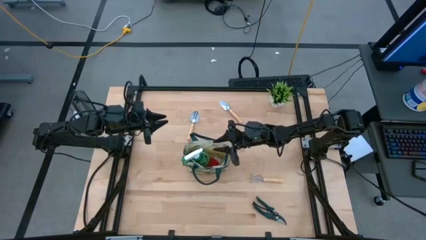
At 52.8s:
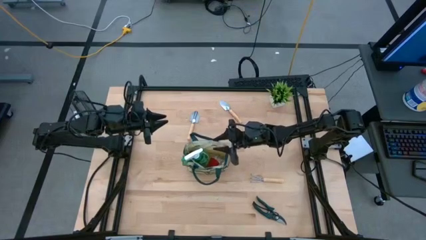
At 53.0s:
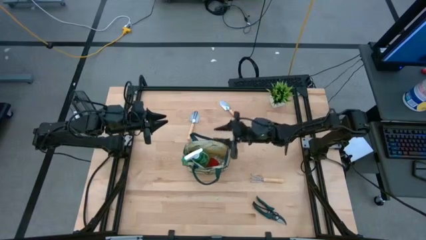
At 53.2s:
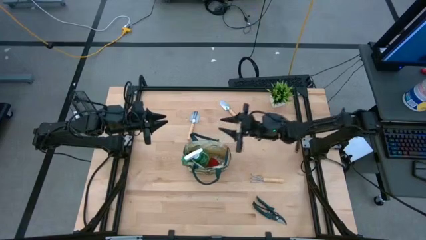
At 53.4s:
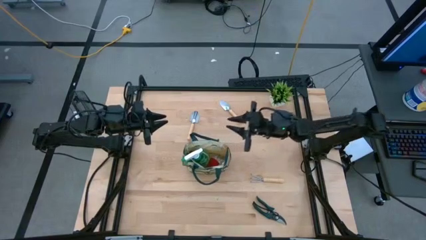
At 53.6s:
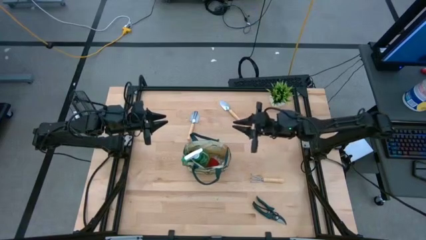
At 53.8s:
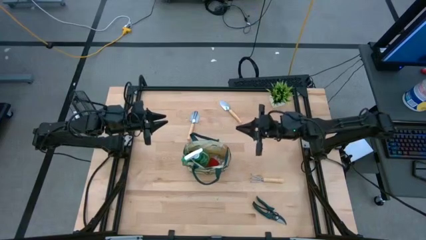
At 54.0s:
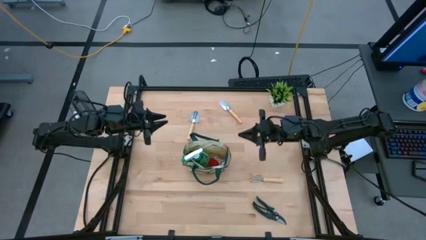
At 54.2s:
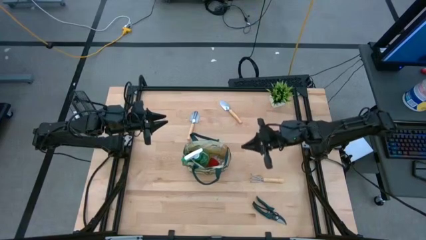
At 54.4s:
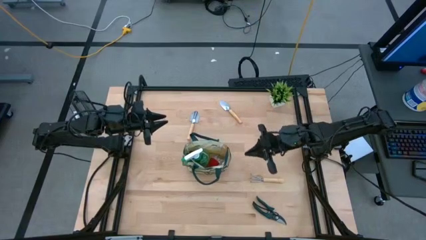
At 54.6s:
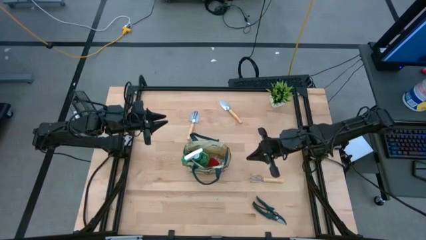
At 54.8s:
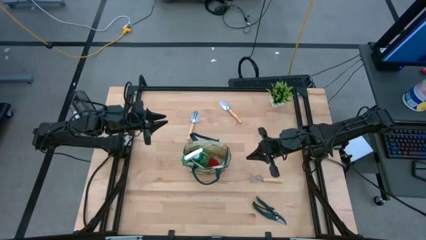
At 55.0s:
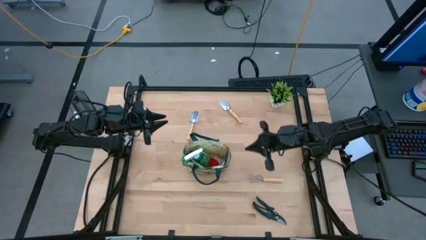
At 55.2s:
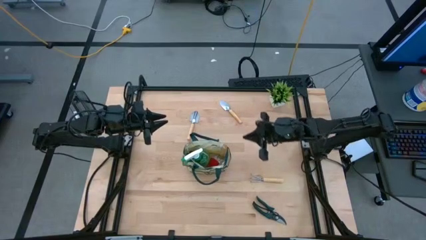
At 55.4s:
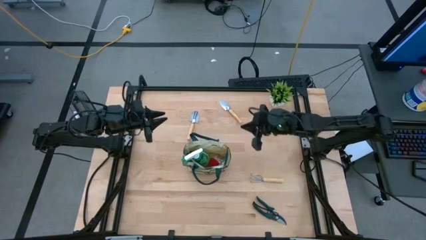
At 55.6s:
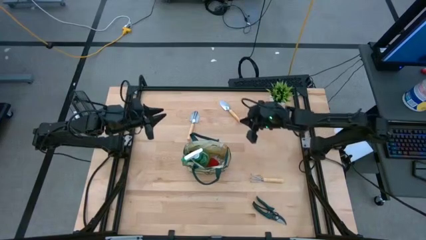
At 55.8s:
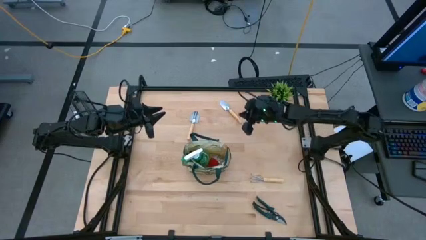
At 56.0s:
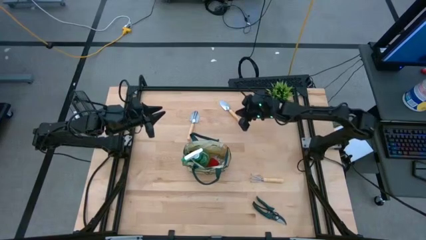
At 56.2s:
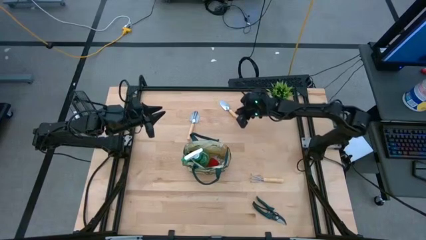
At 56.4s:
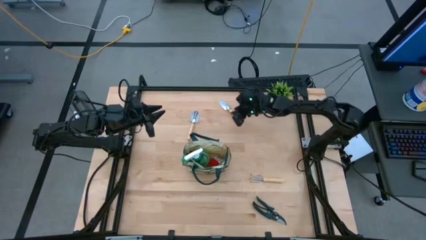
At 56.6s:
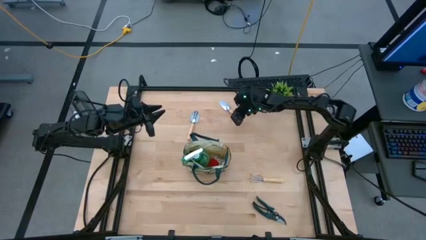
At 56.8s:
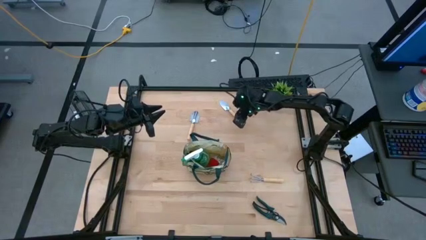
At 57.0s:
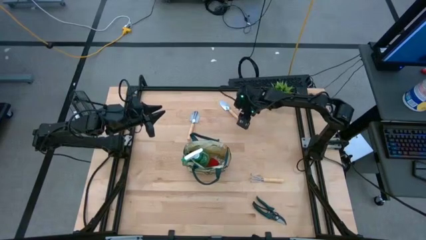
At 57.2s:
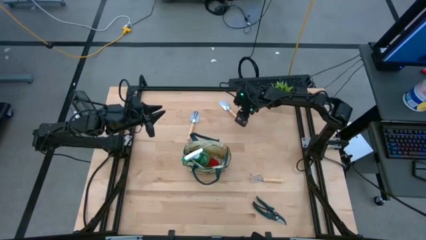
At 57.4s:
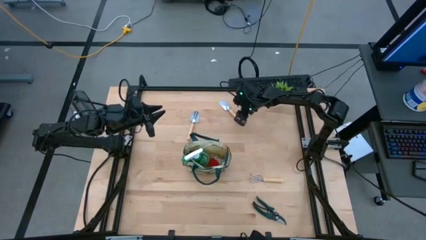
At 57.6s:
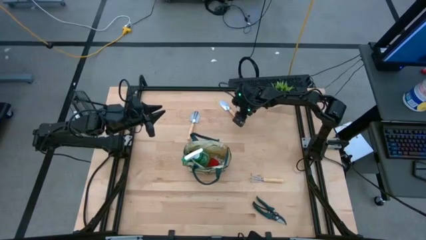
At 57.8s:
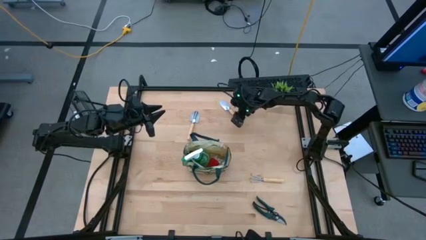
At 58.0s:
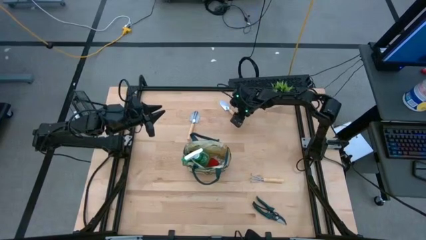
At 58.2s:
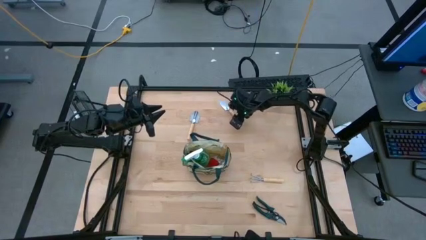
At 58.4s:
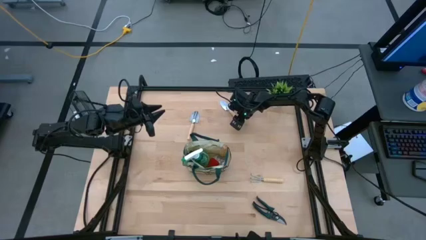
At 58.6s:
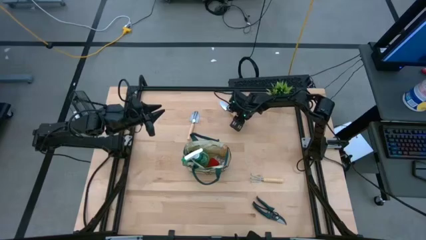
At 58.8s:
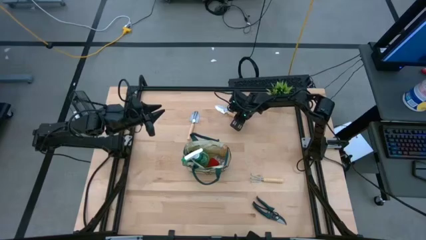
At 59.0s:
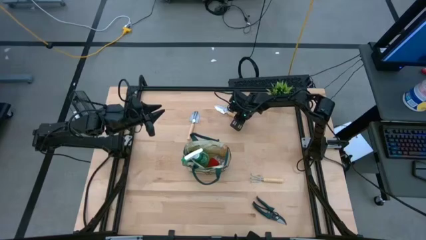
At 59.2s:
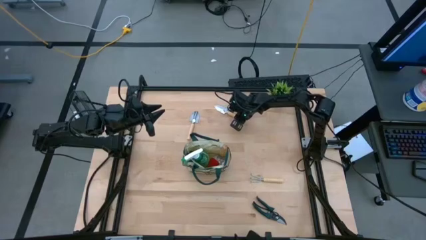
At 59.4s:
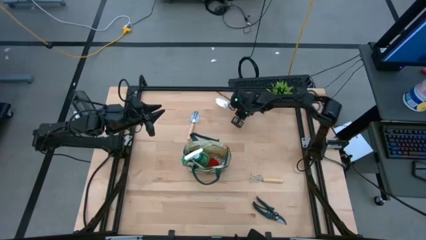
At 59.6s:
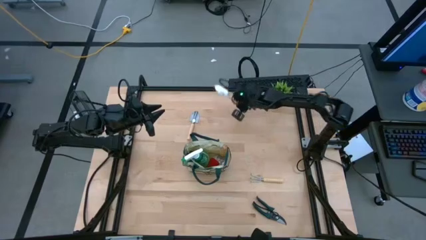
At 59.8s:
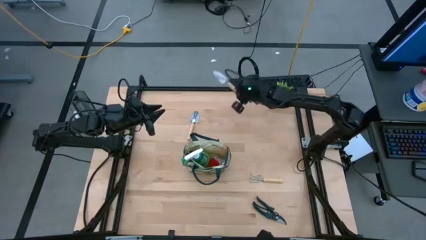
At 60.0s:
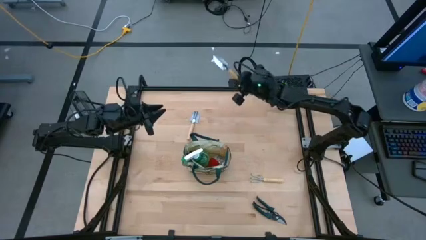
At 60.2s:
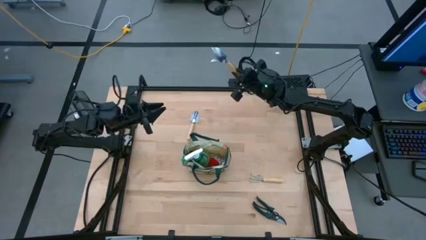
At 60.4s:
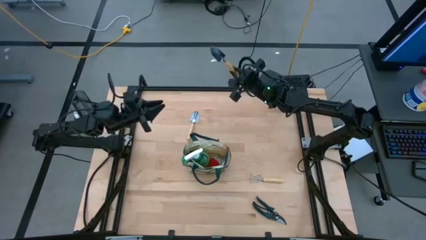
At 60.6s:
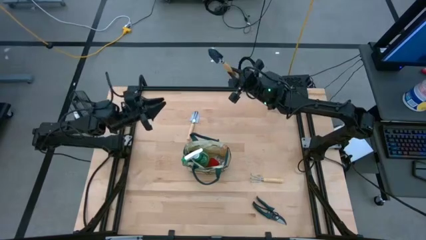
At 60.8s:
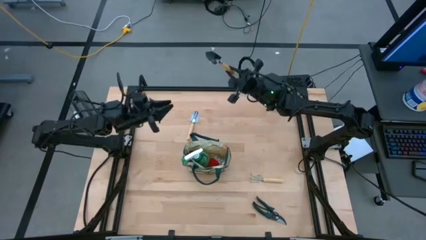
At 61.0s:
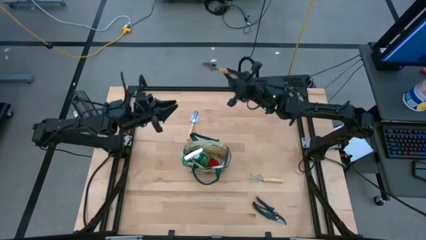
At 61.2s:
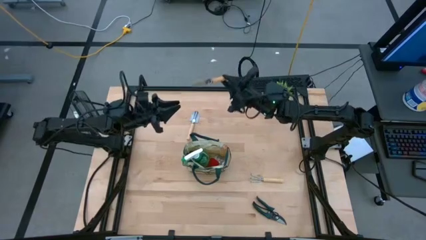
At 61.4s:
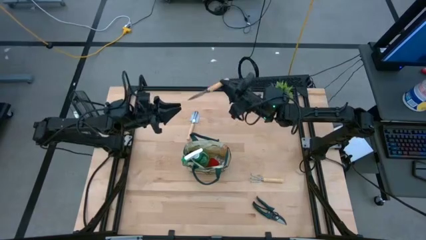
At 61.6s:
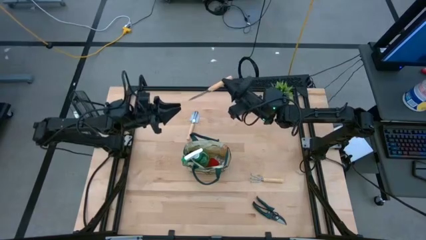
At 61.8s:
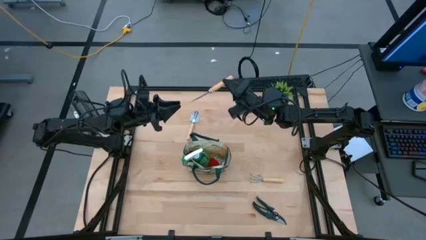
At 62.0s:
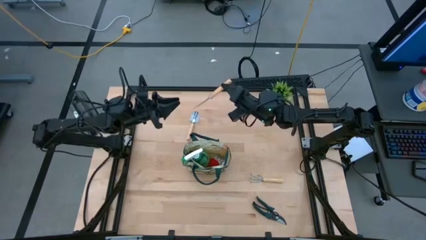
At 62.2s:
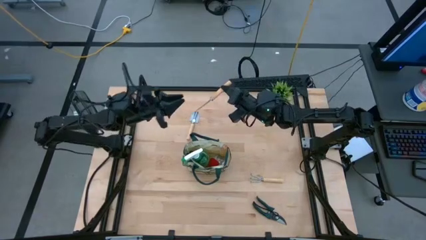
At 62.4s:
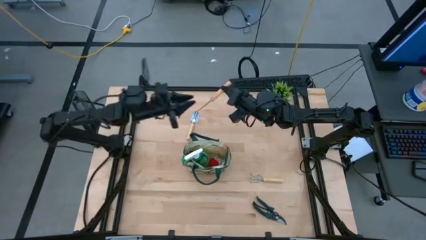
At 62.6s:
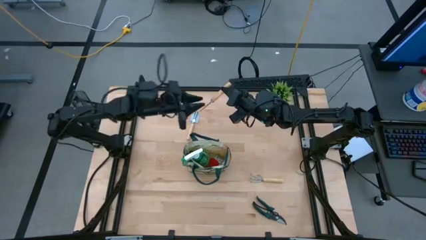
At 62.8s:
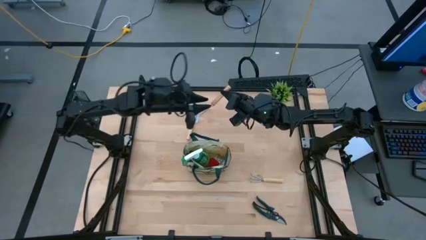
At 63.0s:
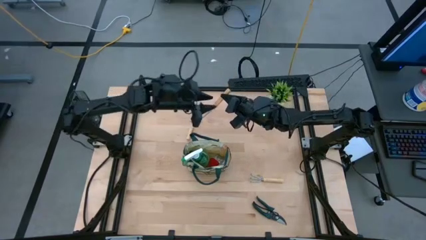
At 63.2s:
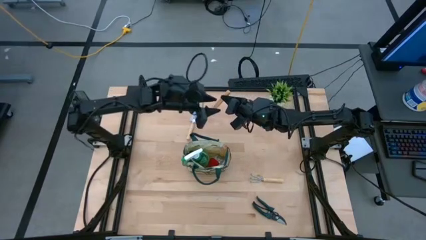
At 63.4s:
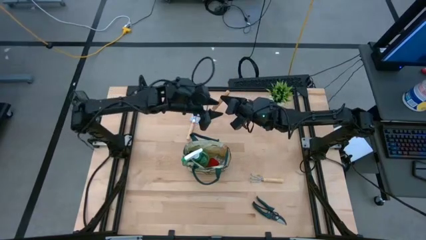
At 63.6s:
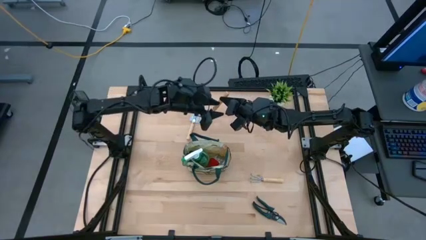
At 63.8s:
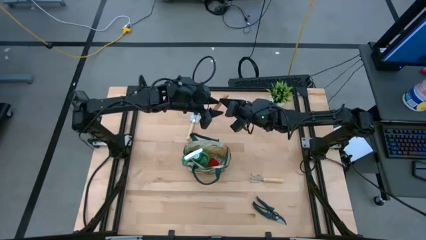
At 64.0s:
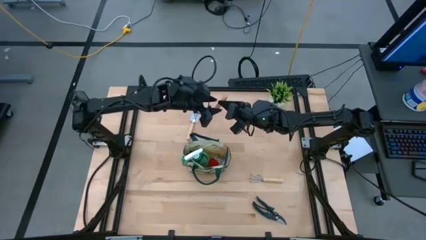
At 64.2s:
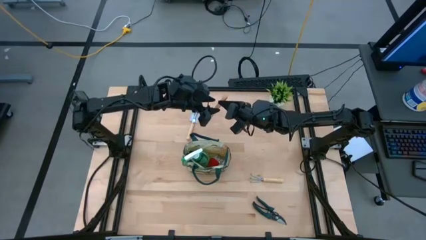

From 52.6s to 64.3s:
Task: Pick & Place Garden tools in Gardening bag
Put the right brown trowel into the white gardening bag

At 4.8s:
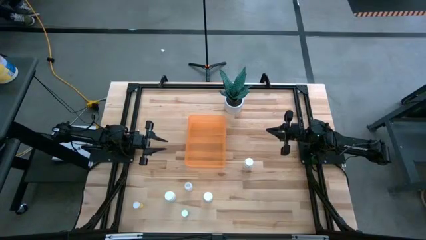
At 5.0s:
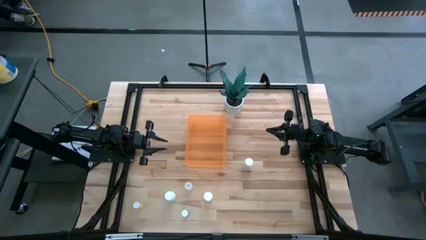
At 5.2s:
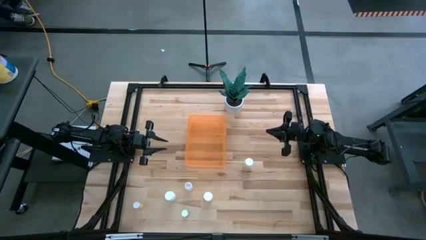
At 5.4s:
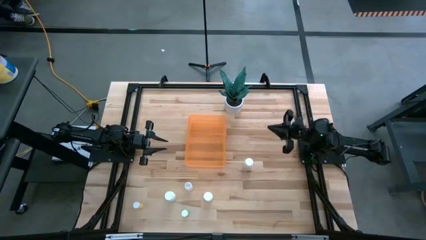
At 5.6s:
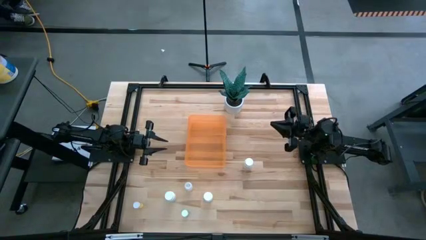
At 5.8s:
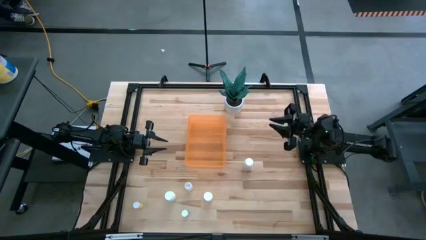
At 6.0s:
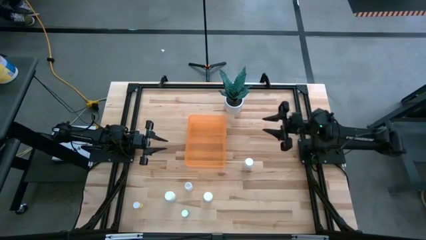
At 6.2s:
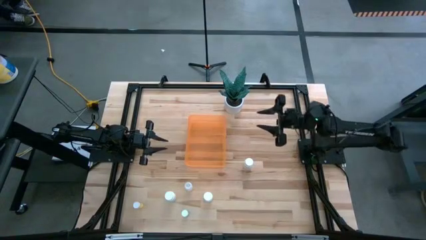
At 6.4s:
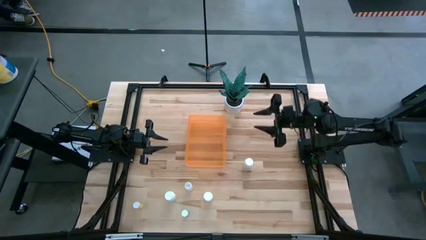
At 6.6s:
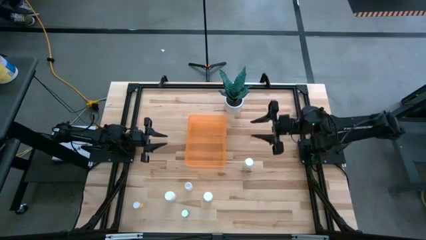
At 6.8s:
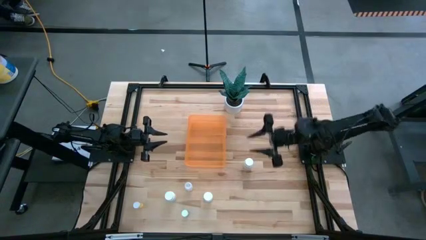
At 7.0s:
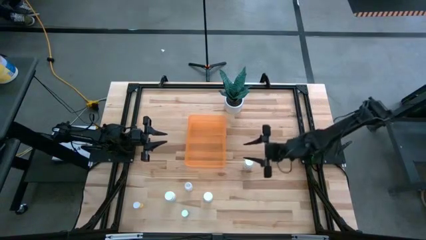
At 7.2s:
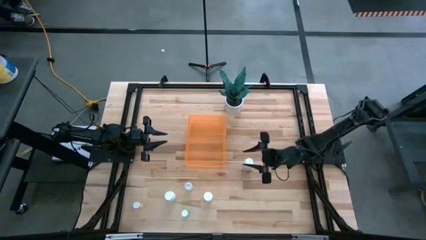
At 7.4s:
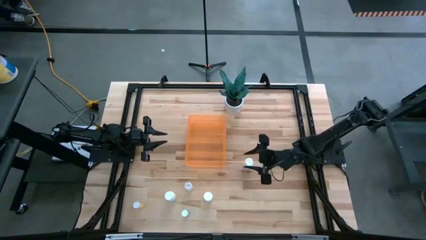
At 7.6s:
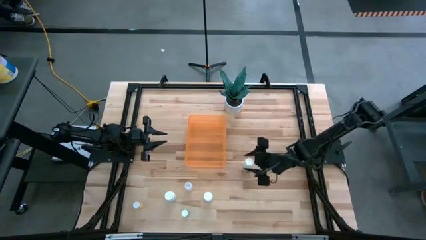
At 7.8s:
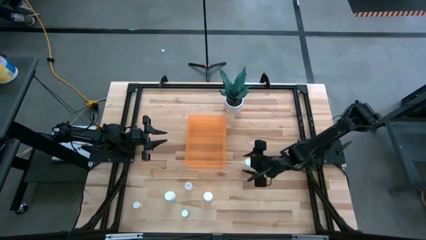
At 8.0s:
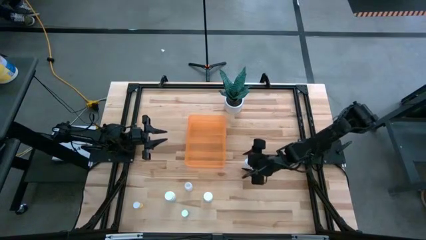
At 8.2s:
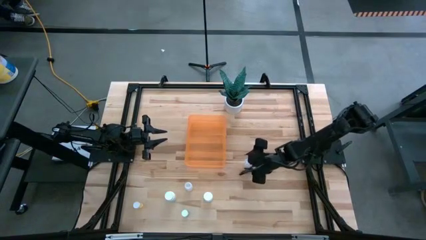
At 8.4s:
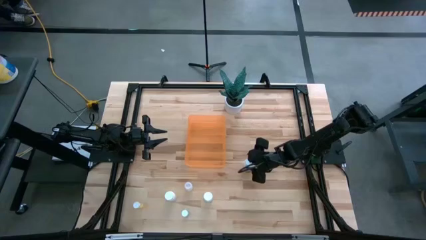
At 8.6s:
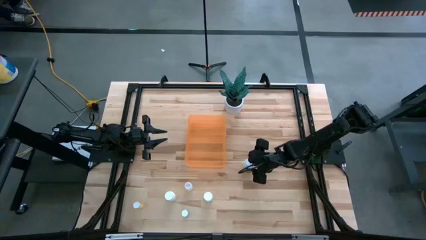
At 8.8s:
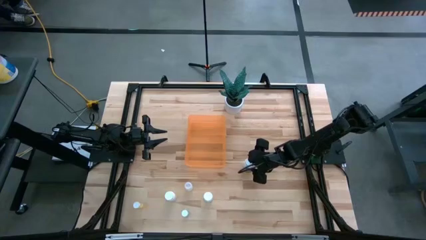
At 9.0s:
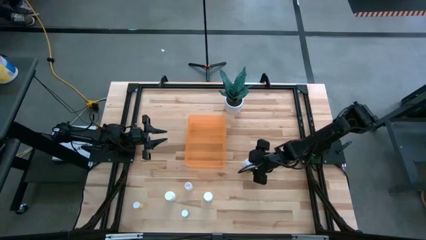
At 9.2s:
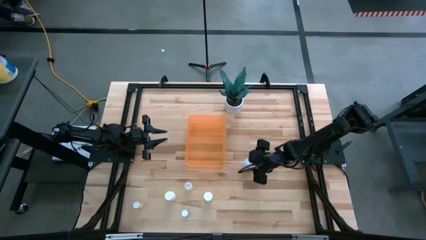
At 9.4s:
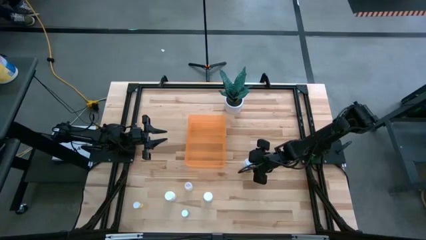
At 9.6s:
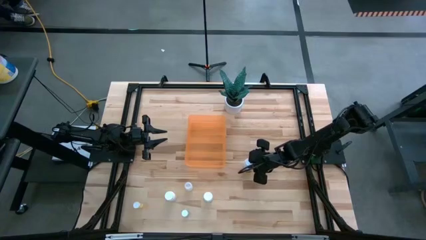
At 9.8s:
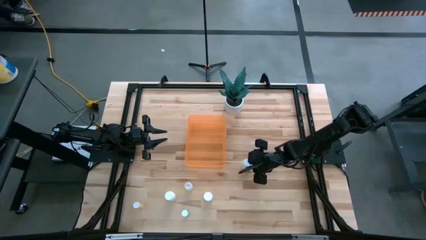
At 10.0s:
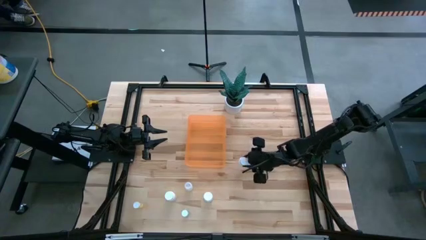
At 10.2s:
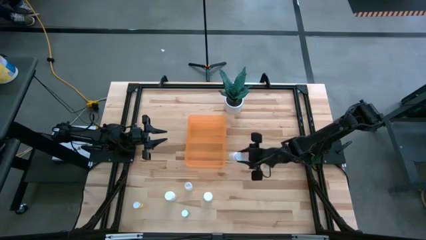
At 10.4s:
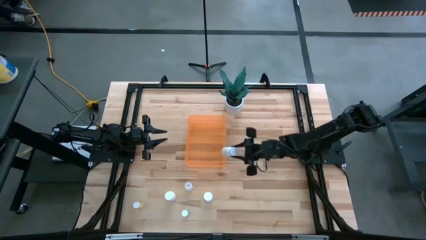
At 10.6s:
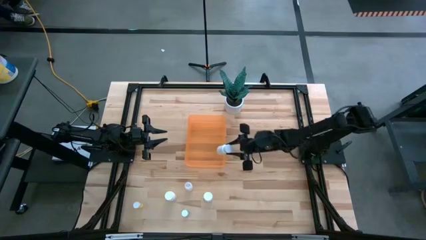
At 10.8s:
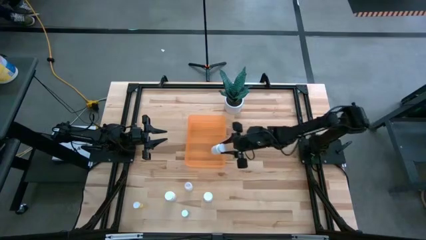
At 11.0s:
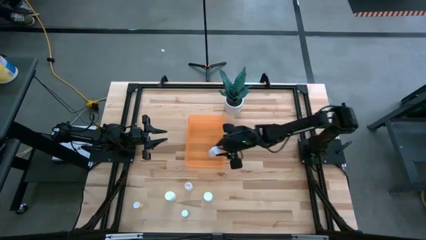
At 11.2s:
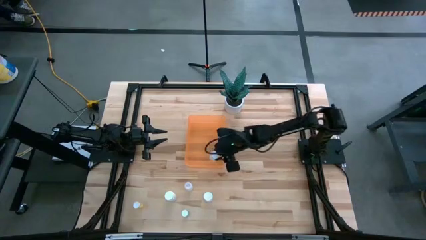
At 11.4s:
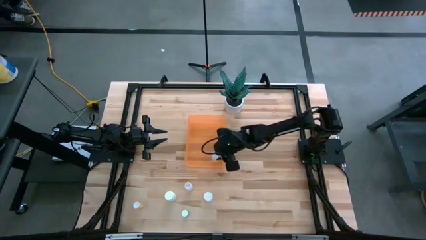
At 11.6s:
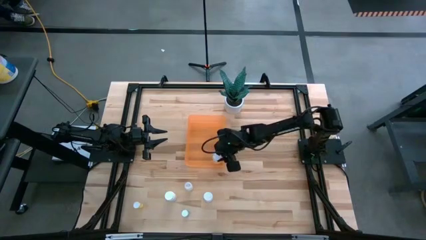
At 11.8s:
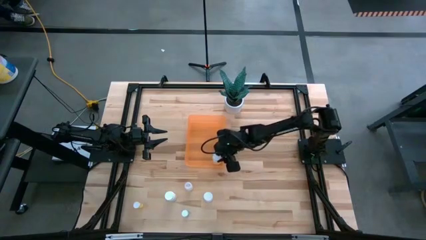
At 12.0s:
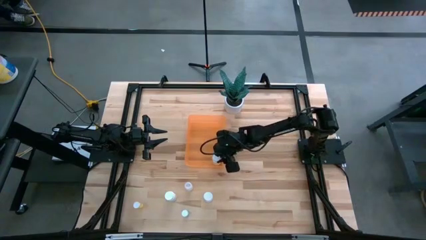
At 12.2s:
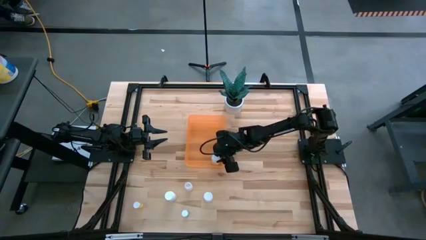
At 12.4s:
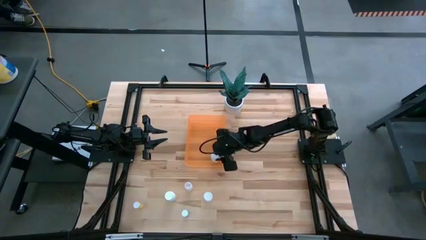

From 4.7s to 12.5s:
Task: Pick and place pill bottles into a basket
Put the top white pill bottle into the orange container
